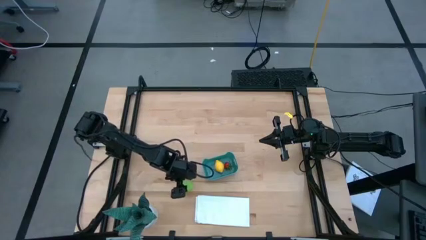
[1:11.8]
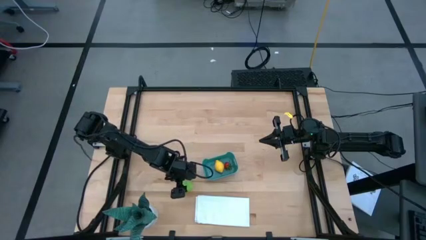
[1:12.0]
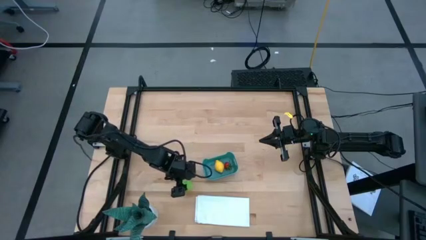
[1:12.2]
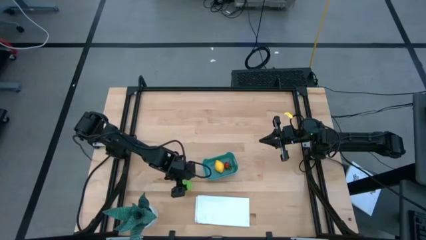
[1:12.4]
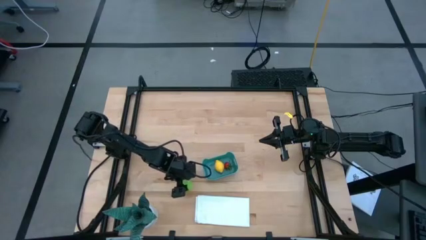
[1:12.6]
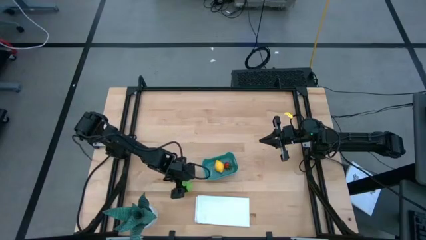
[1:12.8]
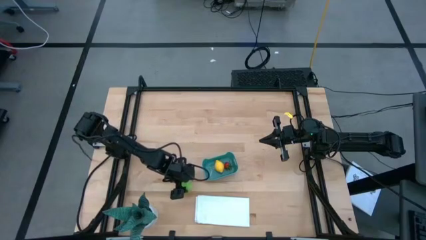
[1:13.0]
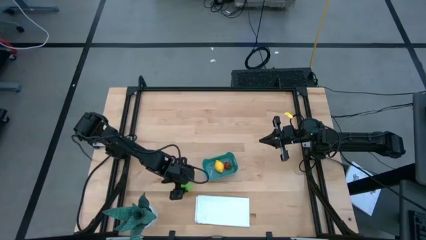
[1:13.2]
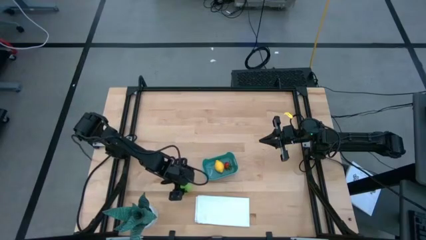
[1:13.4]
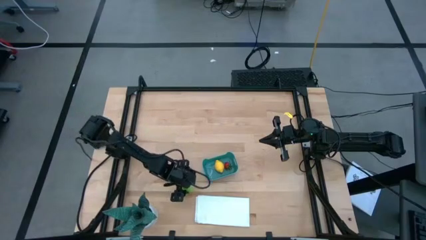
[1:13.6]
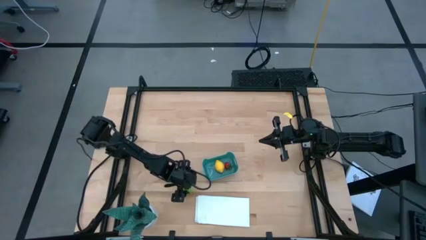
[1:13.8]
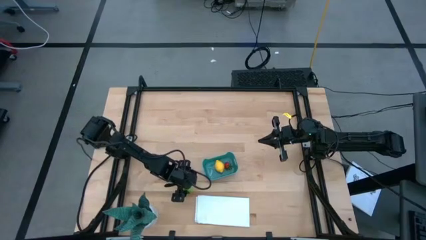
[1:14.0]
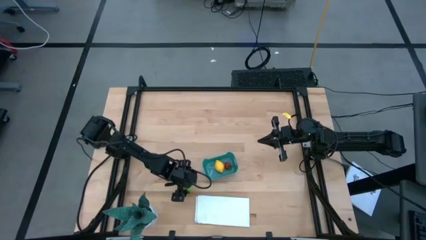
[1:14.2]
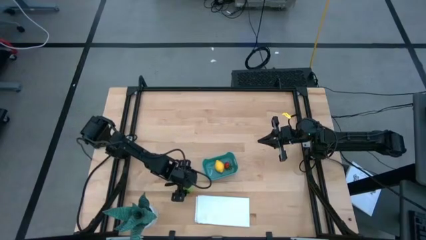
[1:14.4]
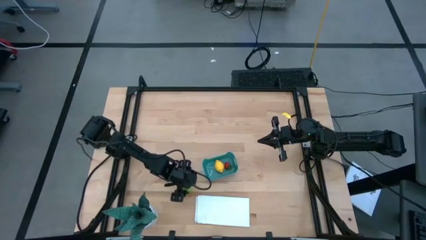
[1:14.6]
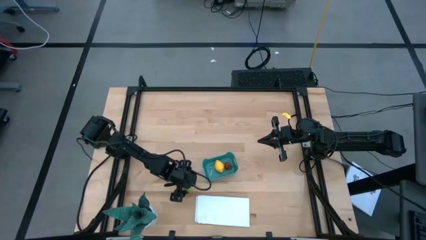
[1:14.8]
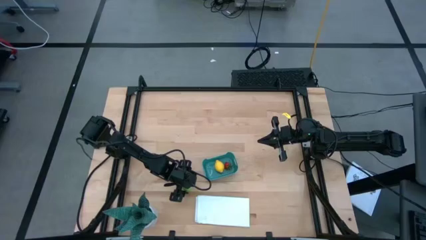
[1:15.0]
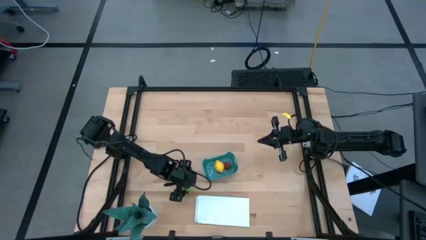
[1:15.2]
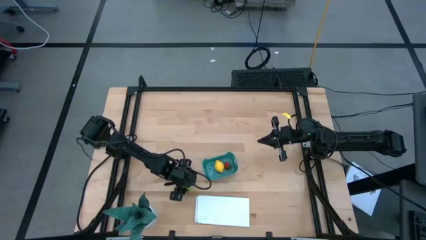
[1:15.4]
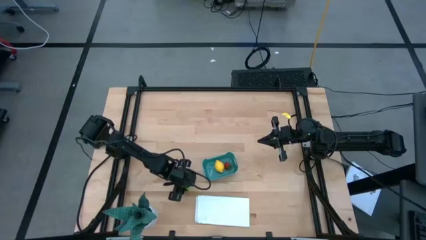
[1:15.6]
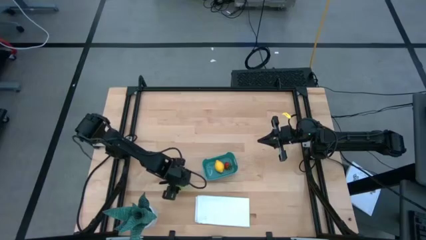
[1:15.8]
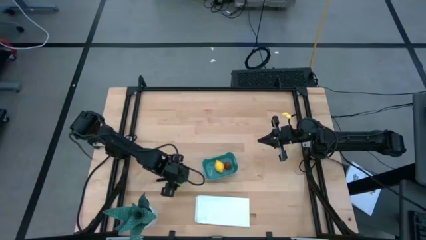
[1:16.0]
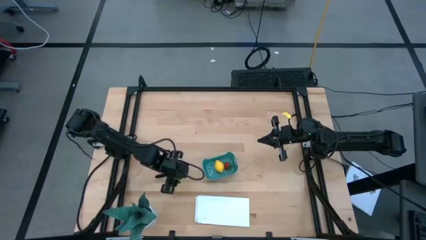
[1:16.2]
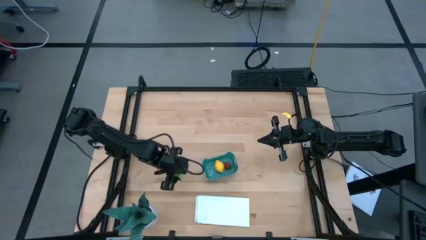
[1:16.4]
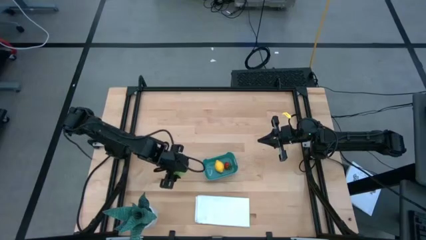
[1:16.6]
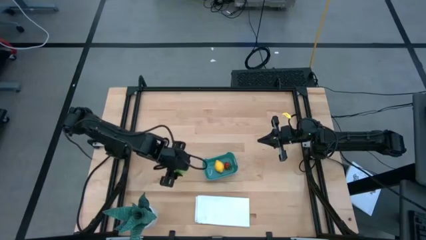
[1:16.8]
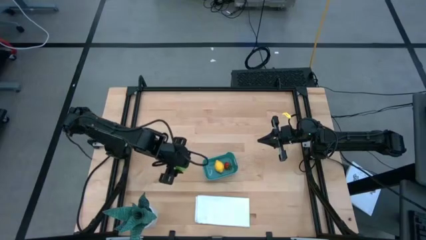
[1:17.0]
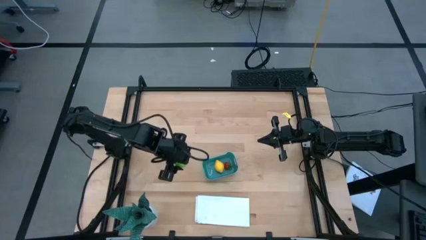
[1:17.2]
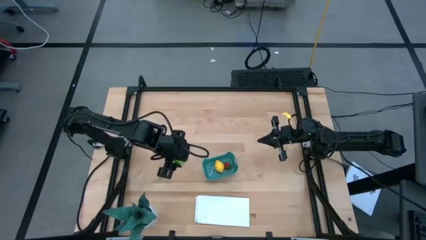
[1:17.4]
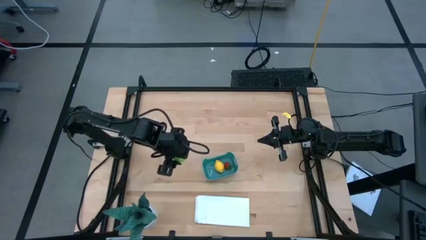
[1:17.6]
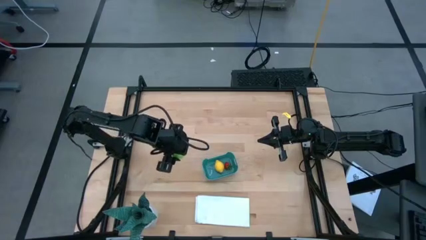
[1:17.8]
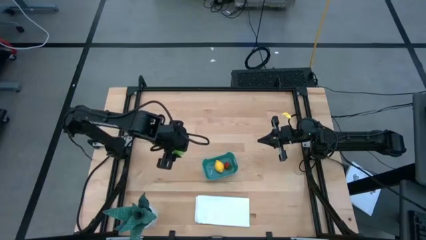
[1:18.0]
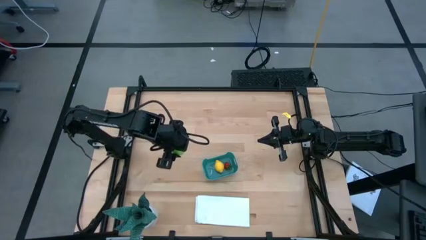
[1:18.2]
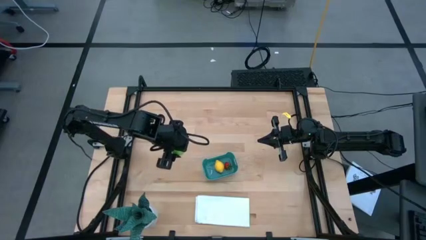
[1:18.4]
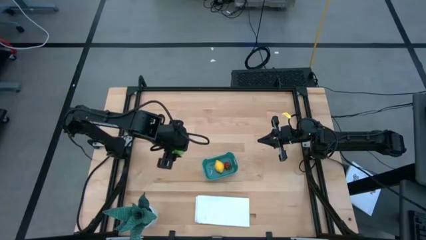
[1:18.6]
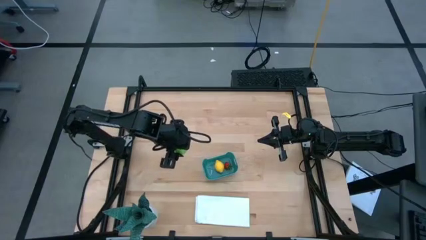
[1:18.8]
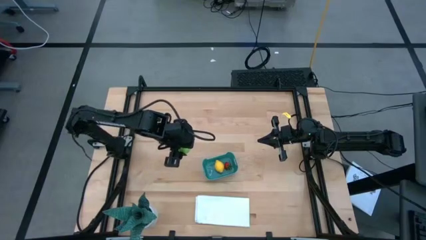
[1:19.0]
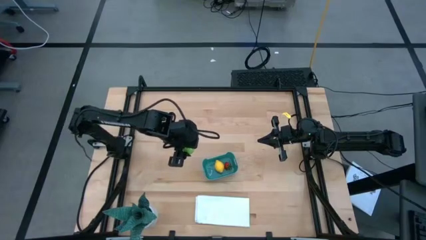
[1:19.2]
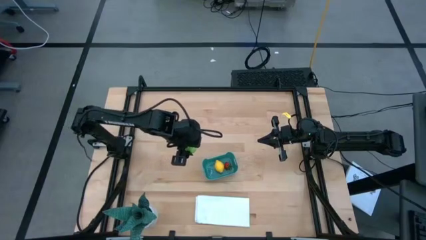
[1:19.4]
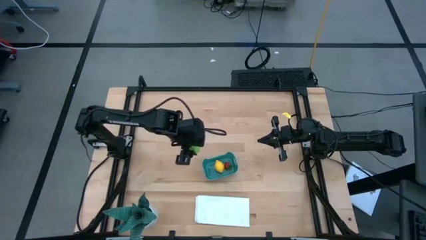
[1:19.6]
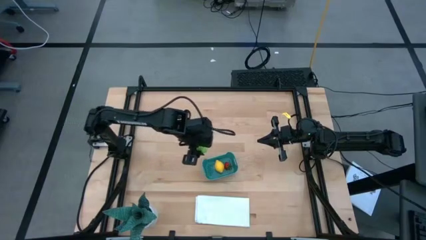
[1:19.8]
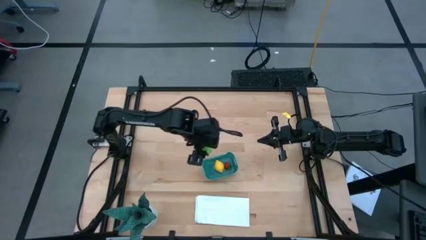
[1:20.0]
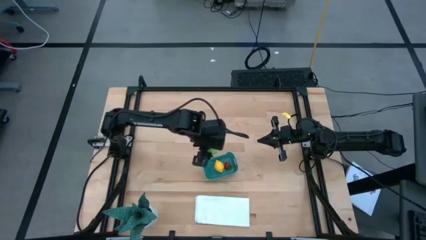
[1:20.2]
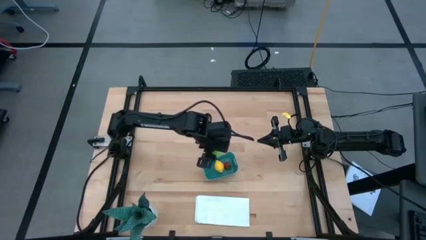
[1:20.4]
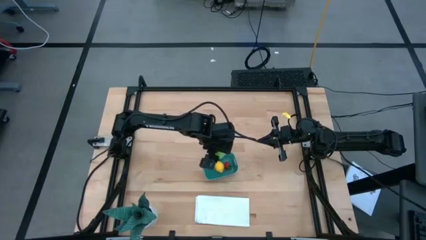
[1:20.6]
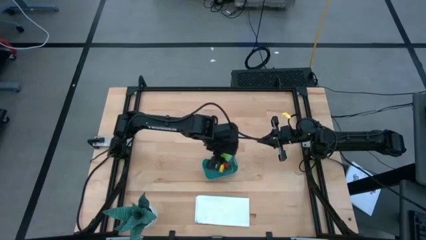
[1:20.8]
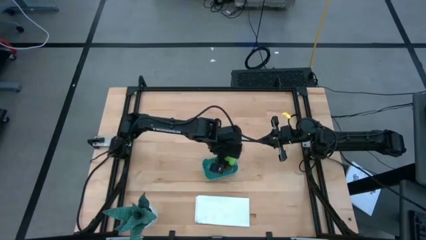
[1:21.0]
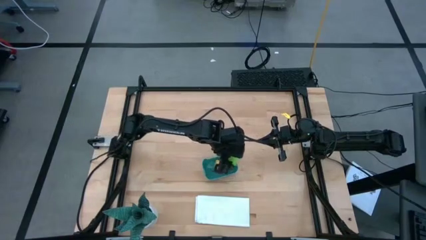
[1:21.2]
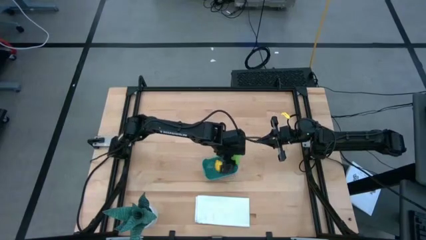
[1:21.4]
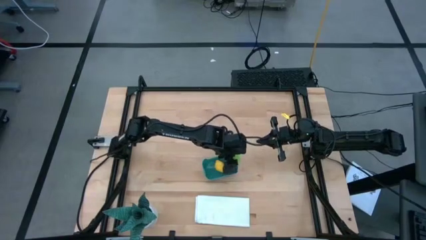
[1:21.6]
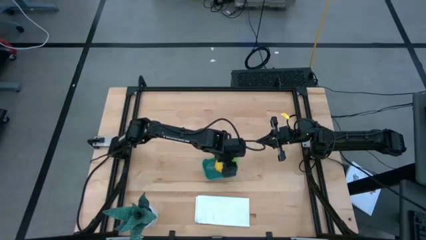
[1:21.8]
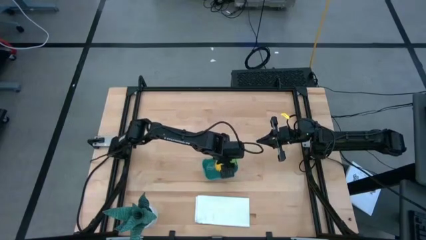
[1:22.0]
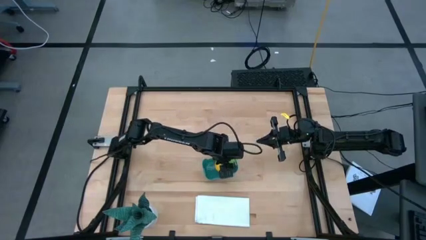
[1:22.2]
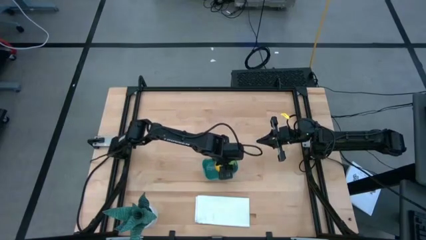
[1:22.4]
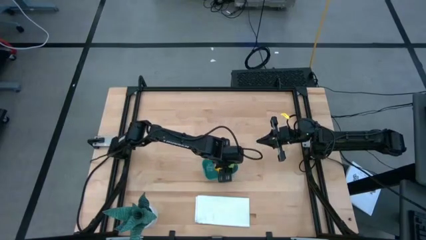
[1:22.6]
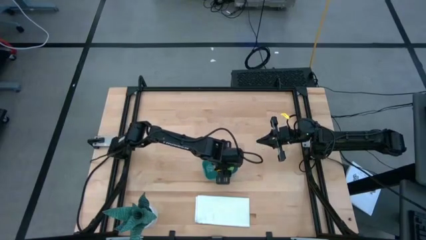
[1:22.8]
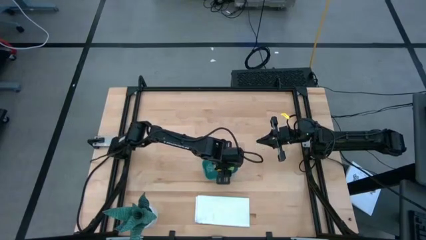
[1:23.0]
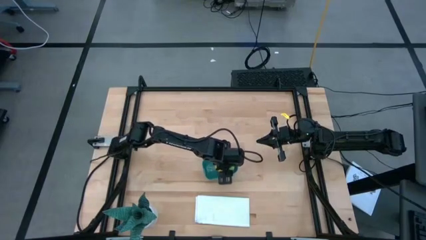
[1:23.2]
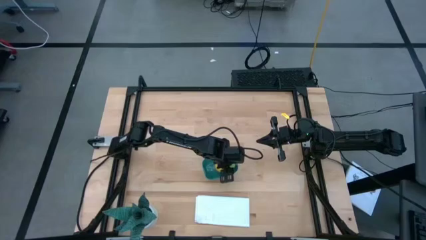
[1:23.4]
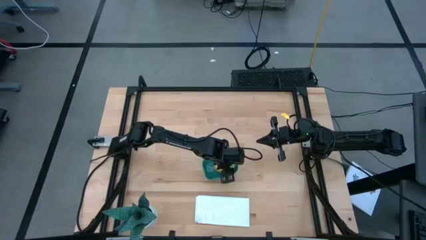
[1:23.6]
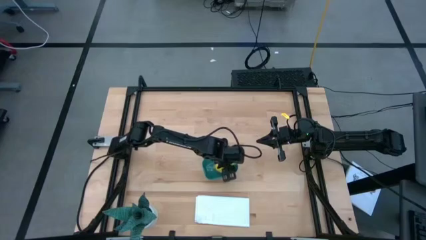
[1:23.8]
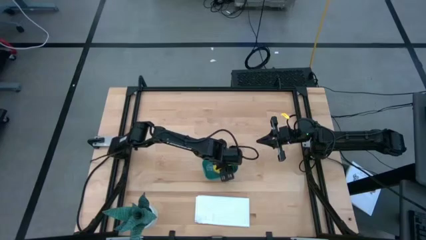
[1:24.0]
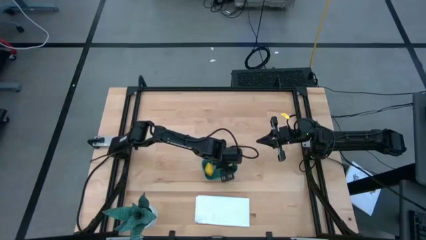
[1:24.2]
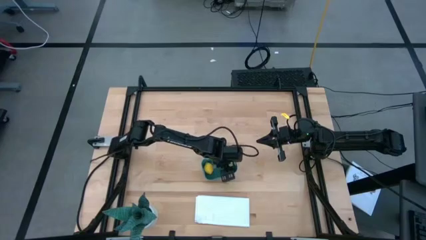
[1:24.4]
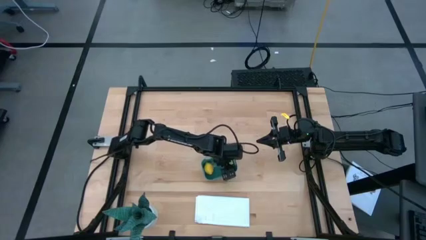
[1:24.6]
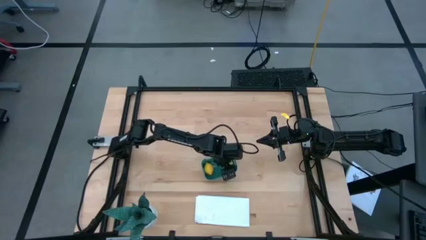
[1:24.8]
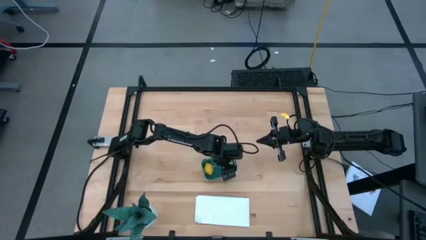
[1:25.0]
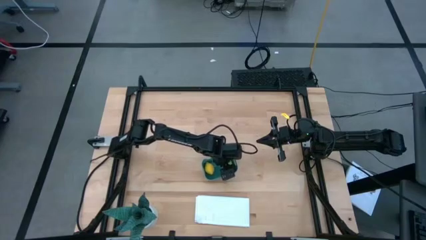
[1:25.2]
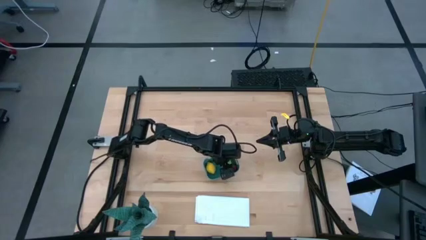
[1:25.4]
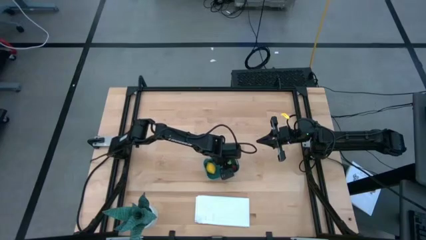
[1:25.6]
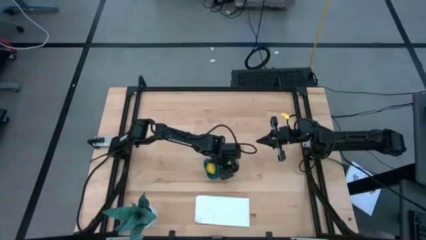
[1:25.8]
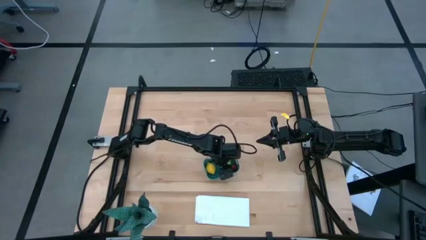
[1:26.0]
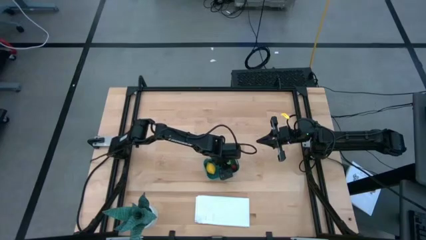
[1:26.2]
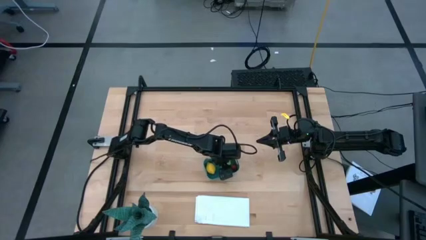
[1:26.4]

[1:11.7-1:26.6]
Task: Pick and placing Produce into tupperware
Put the cabbage into the green bin
